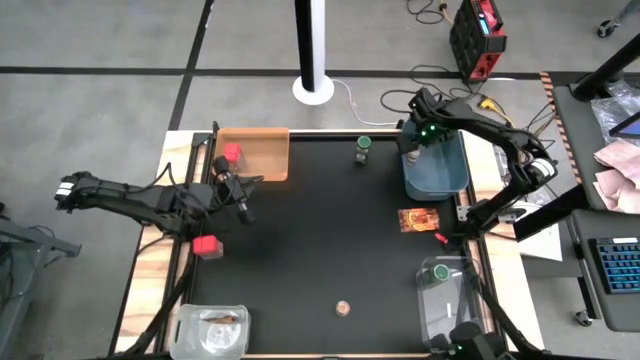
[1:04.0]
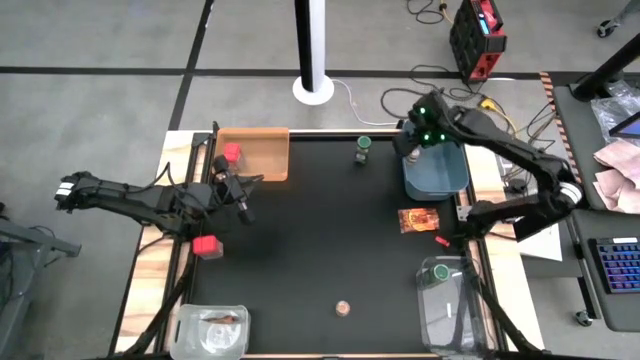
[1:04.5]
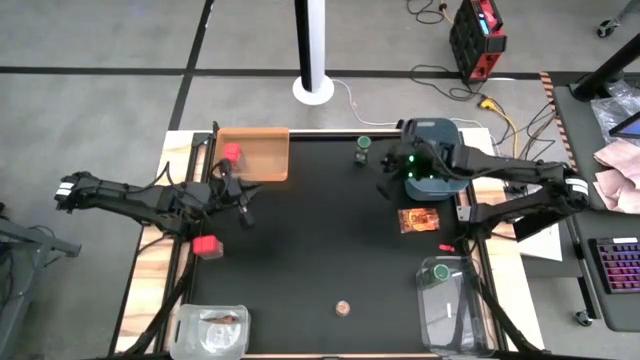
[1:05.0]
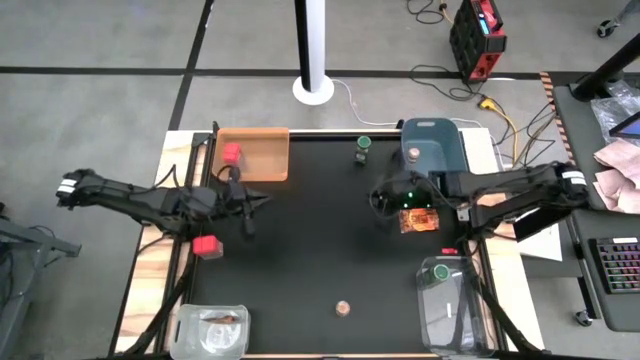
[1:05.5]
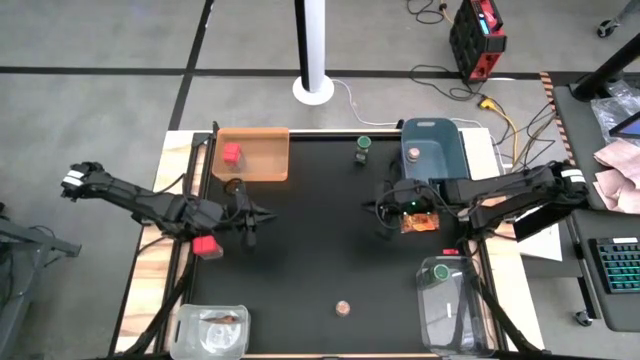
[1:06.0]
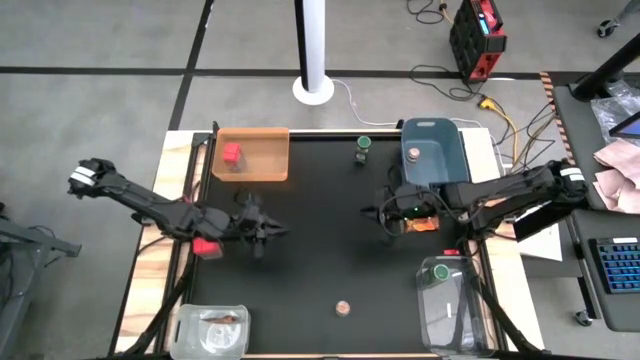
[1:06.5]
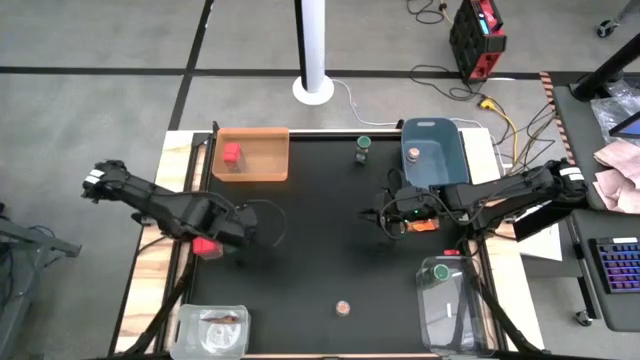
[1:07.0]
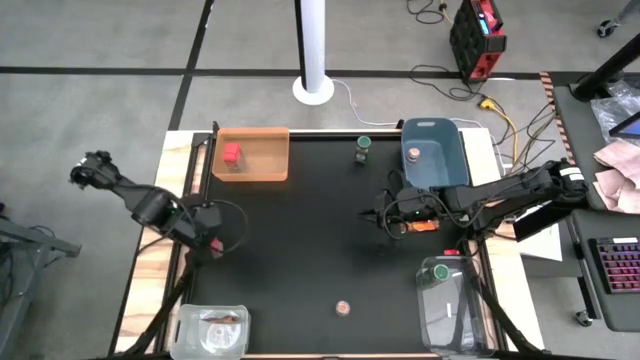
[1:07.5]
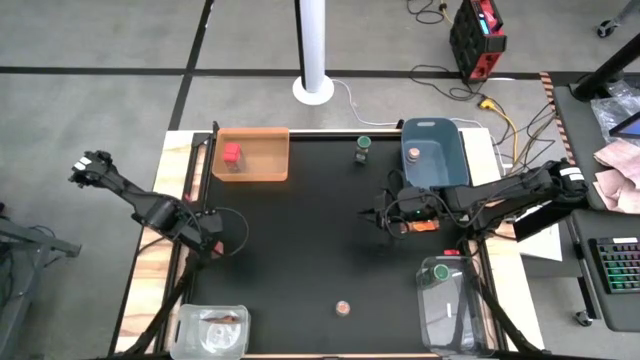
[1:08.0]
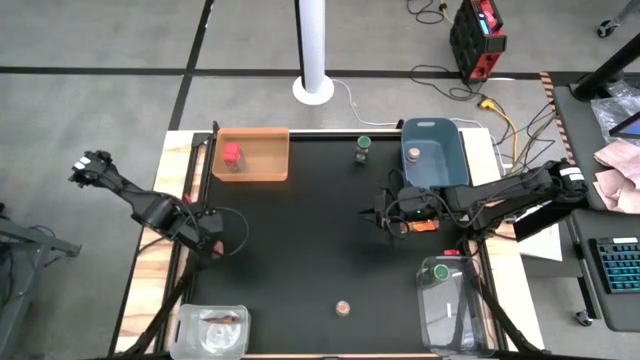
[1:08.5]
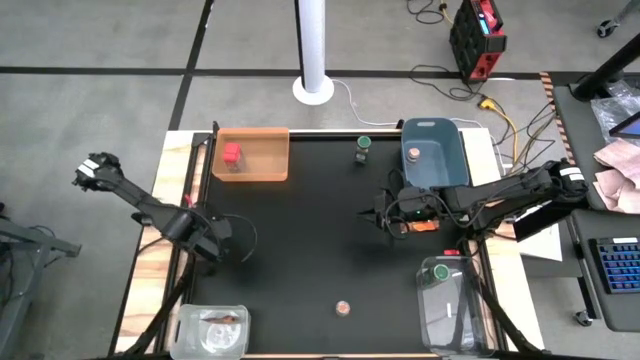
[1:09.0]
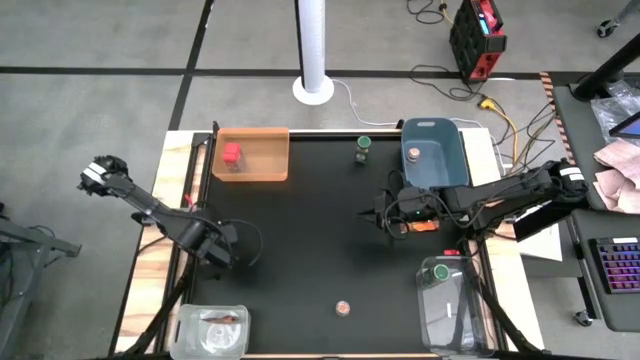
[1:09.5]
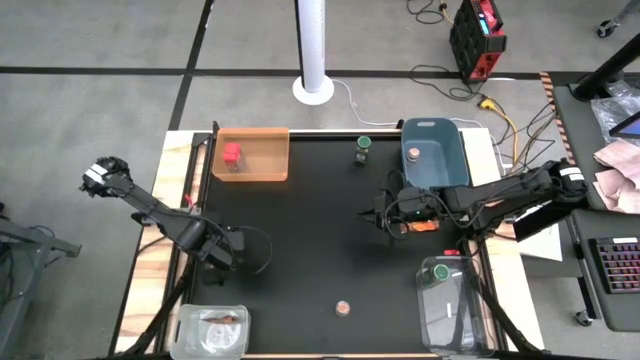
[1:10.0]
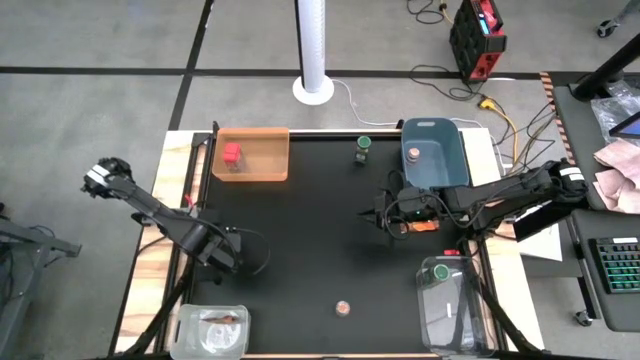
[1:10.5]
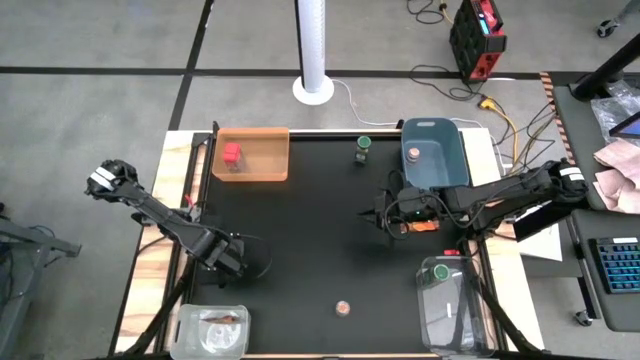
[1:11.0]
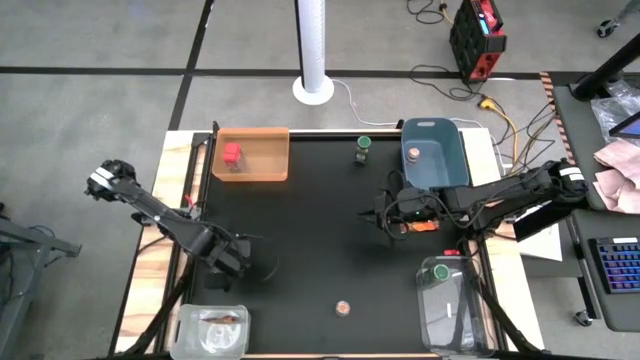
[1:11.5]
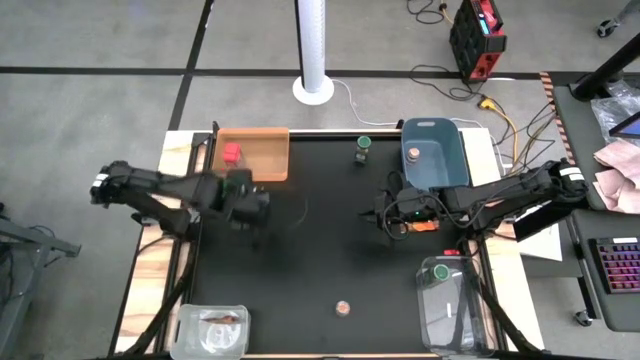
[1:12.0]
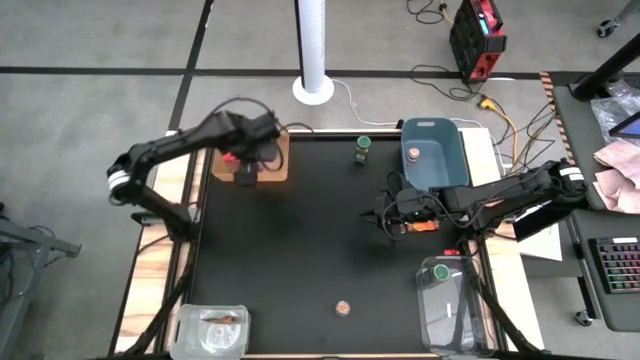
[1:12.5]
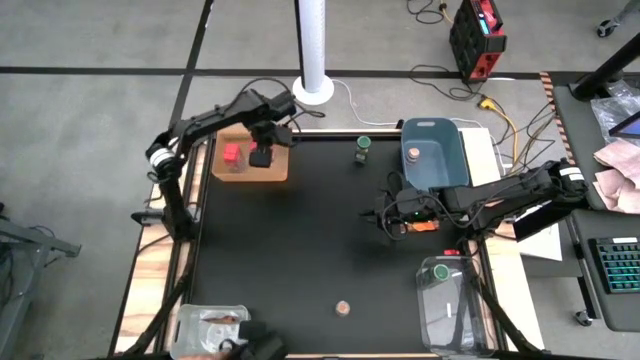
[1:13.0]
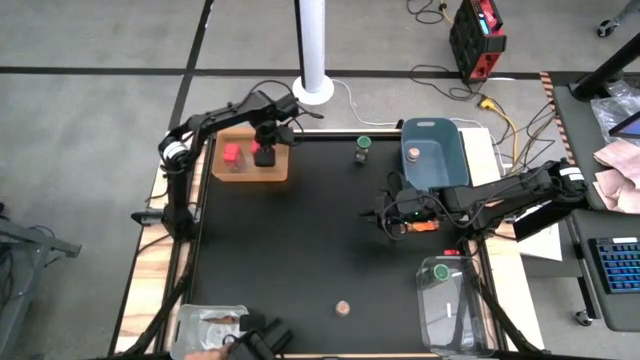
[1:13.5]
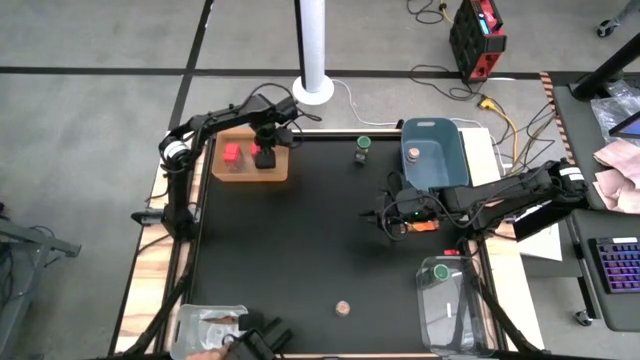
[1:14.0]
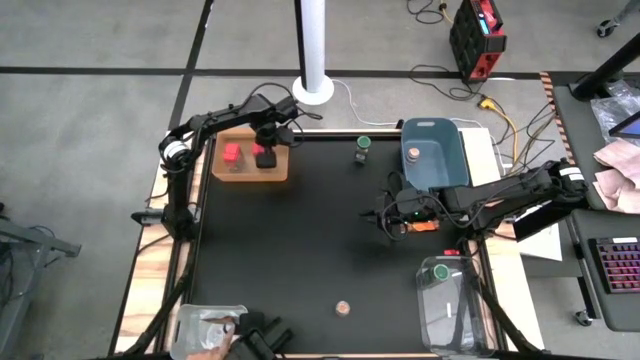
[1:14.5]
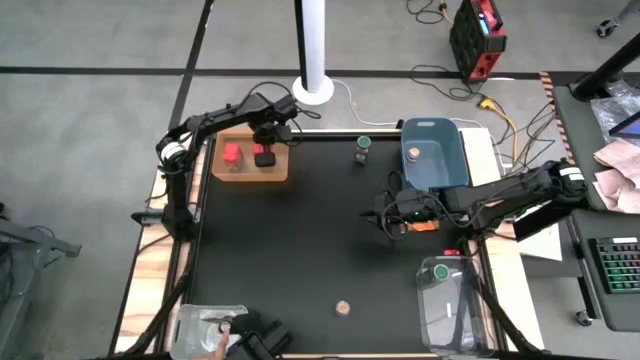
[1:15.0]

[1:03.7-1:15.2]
Task: Sort spices by type
Put the red seasoning can into the orange bin

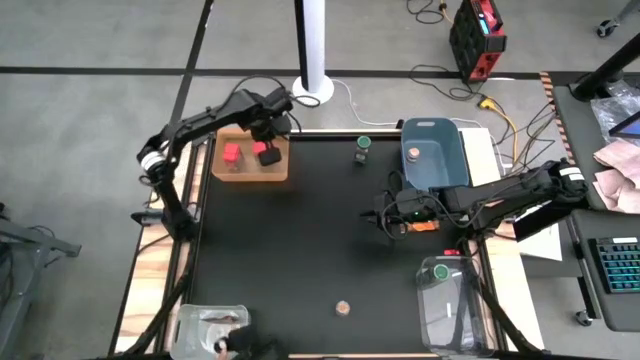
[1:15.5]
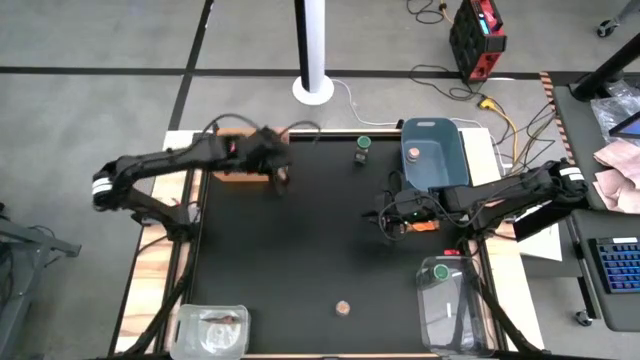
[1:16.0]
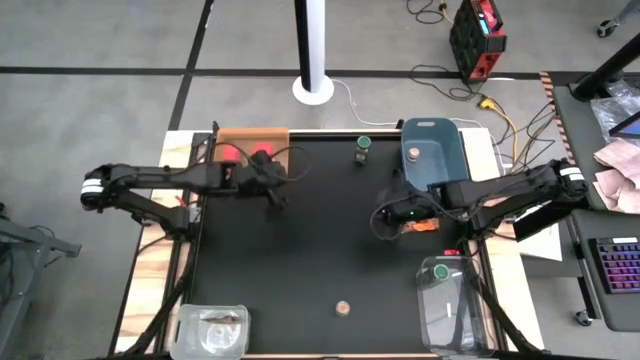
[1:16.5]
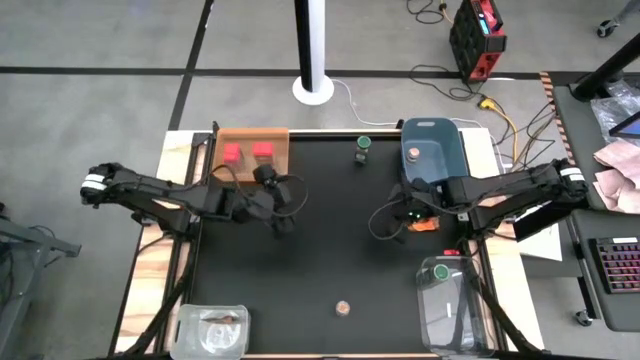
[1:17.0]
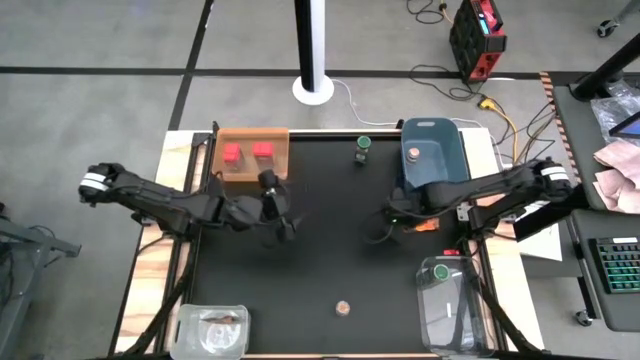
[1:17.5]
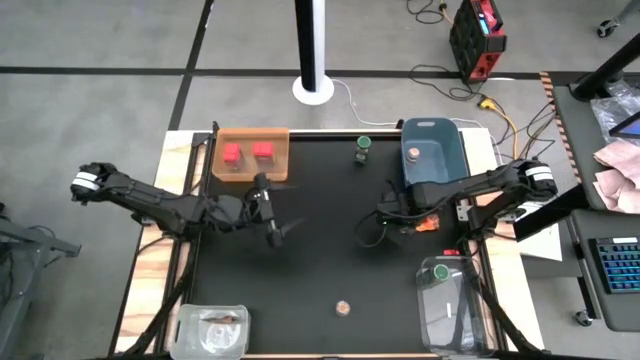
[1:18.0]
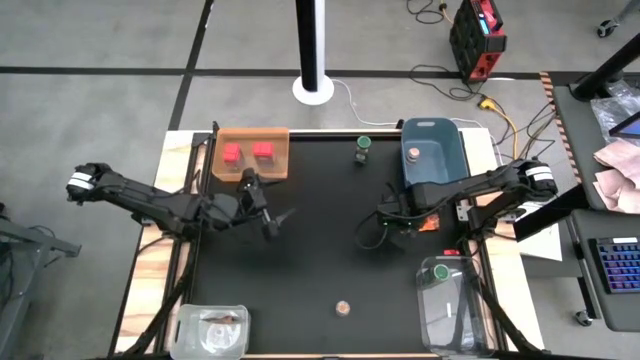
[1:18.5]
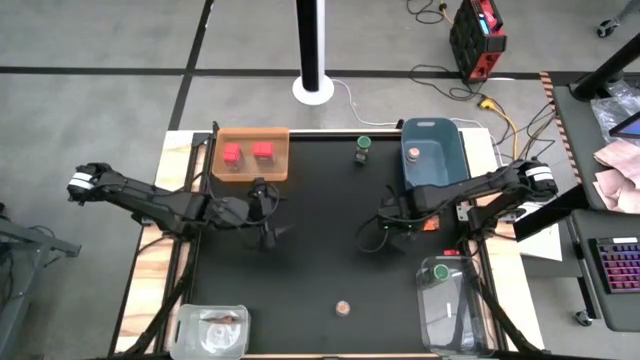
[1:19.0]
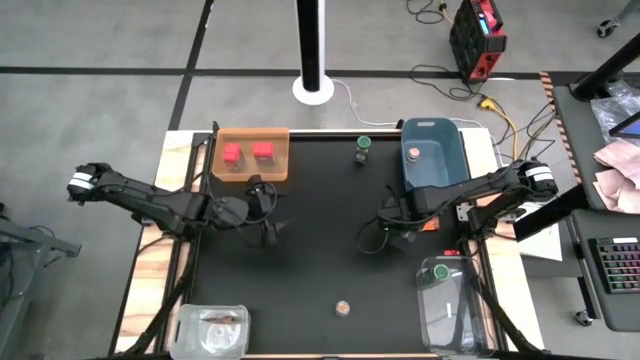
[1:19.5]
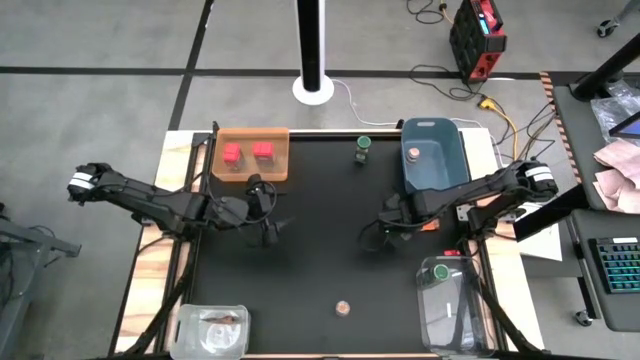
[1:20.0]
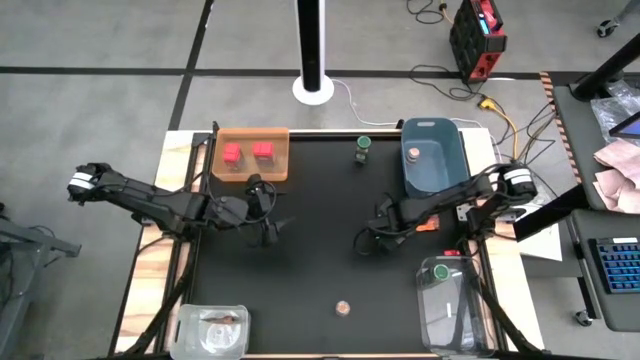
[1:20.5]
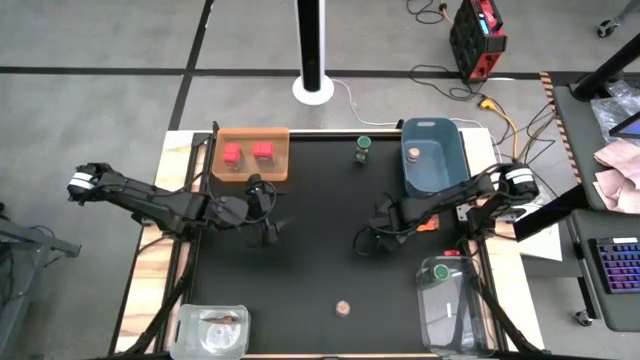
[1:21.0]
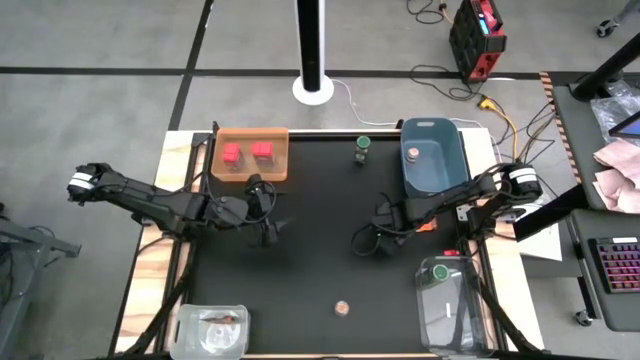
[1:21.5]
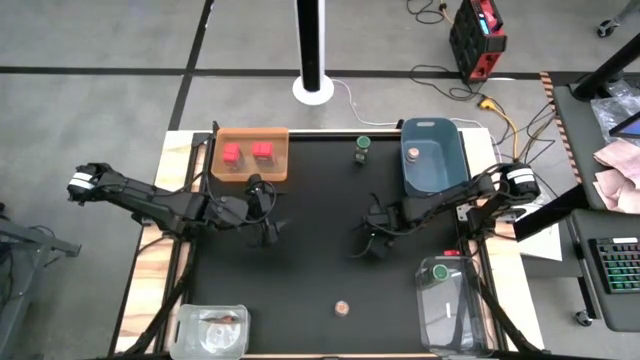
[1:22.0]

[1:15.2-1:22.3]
Put the orange seasoning bag into the white bin

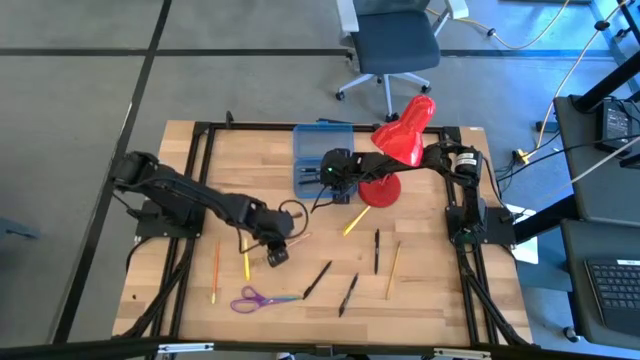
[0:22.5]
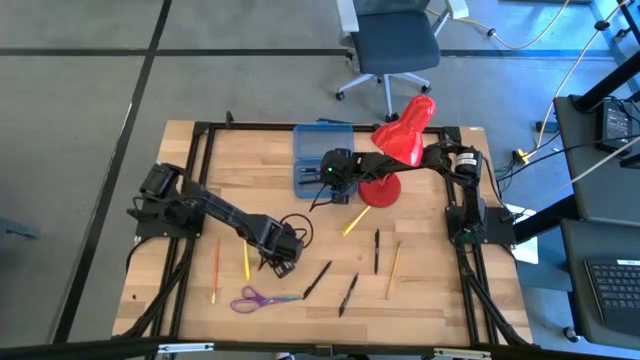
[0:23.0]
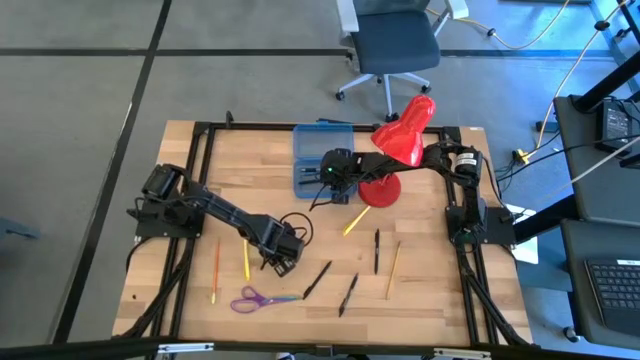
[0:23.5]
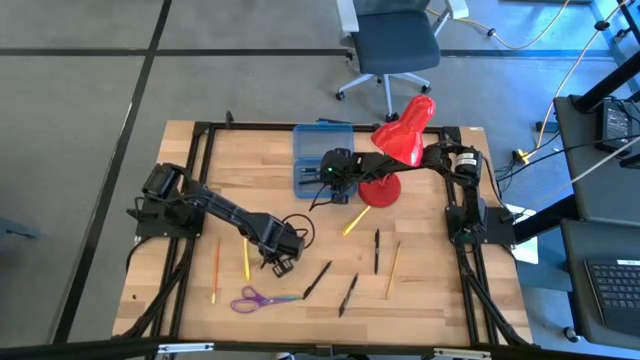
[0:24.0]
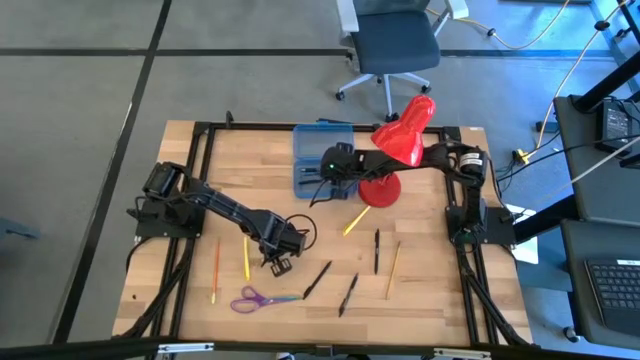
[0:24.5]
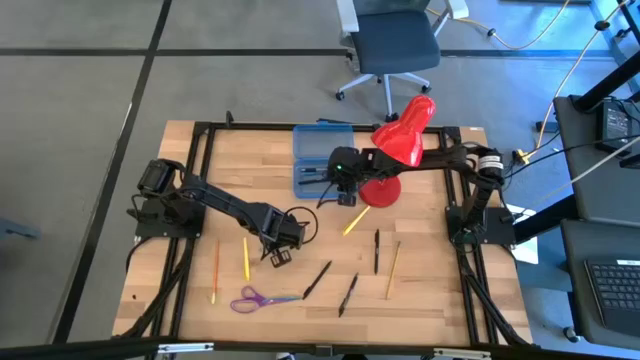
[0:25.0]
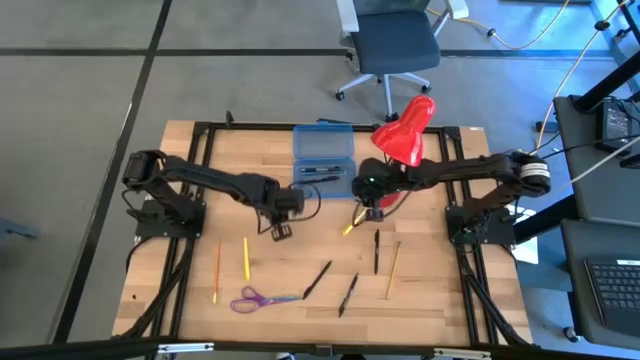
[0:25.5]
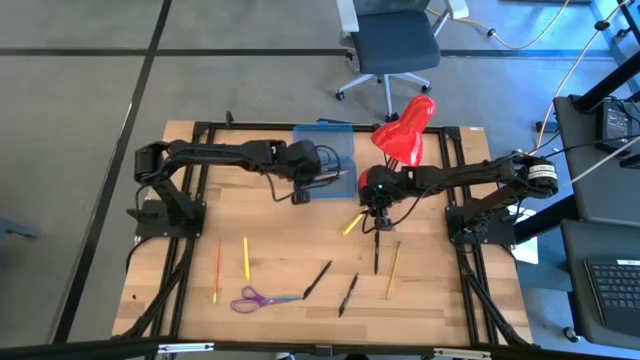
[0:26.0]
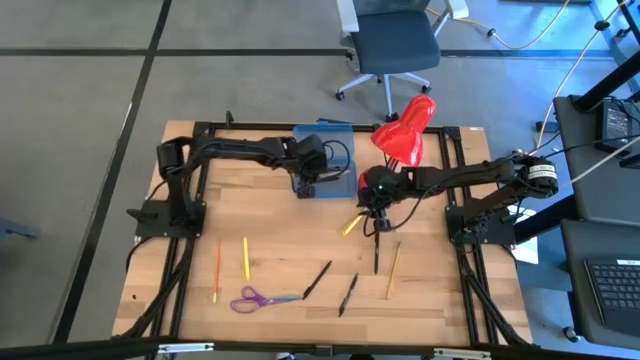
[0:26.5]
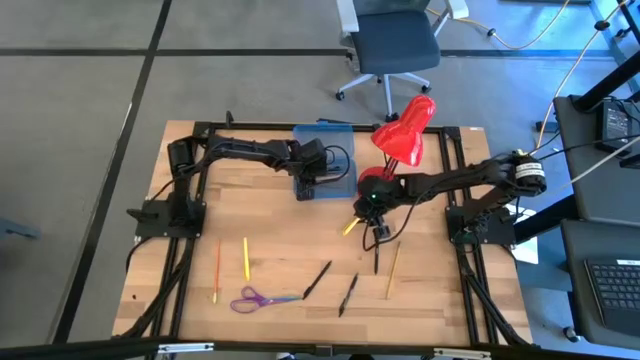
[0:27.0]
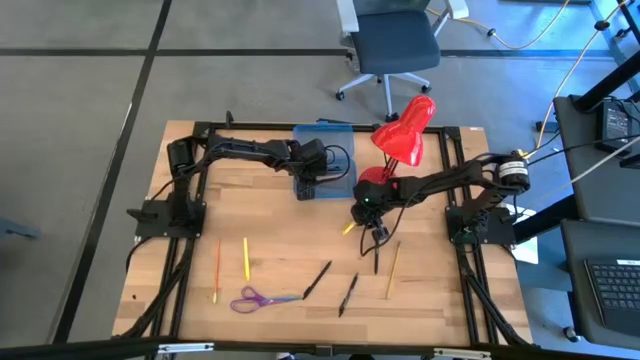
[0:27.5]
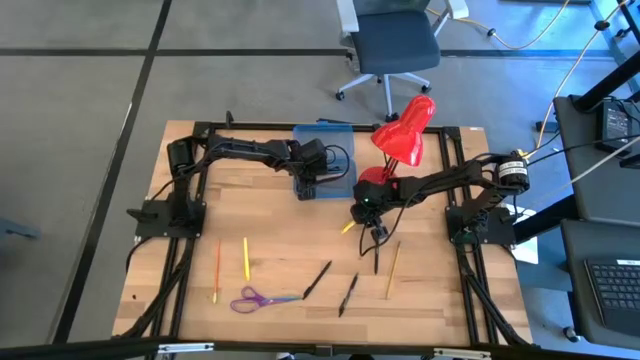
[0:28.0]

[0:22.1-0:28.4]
Task: Pick & place school supplies into a supply box
Put the pink pencil into the blue supply box
